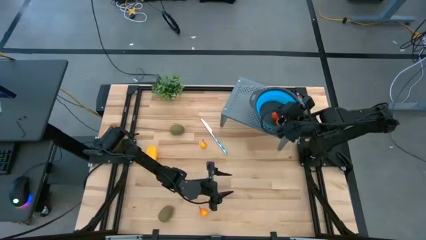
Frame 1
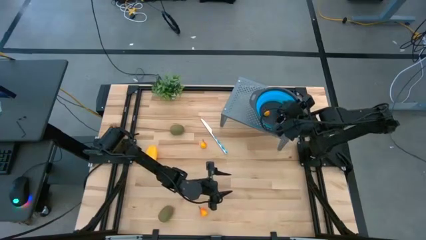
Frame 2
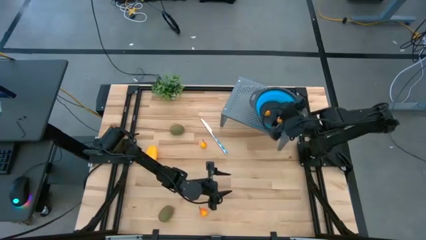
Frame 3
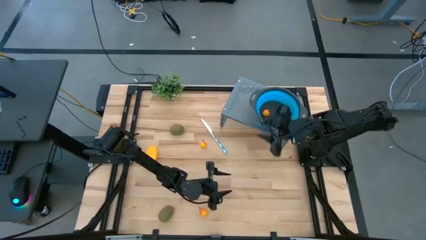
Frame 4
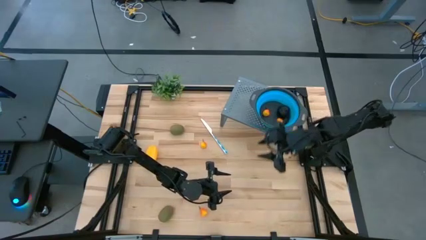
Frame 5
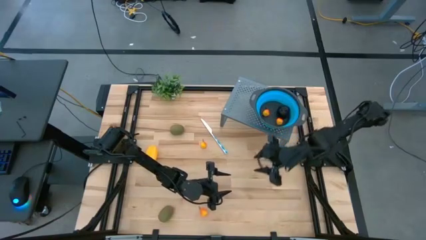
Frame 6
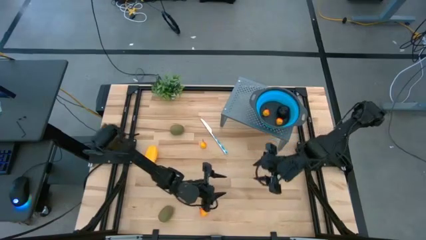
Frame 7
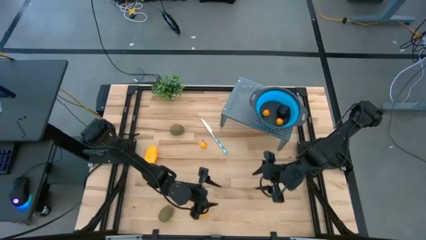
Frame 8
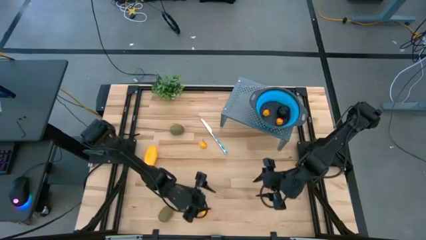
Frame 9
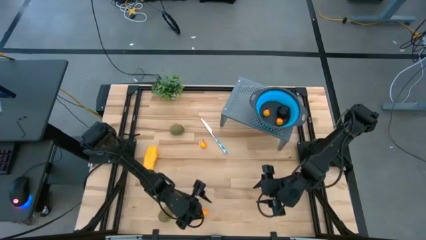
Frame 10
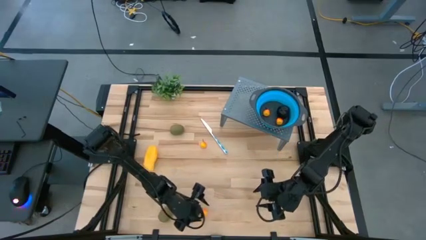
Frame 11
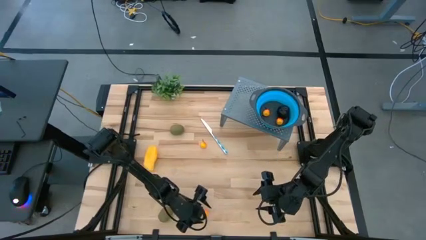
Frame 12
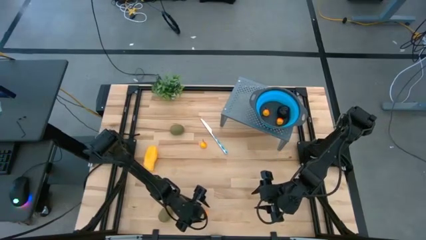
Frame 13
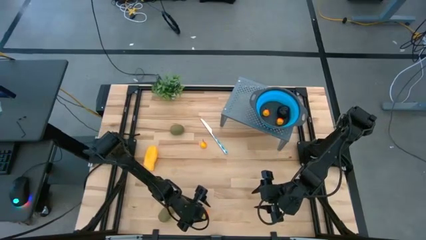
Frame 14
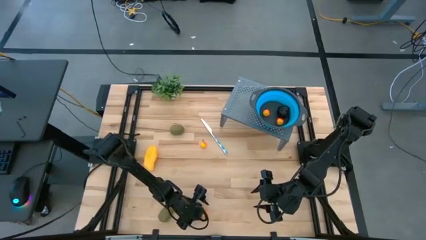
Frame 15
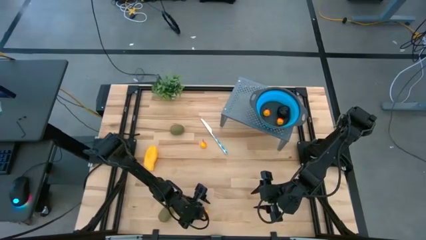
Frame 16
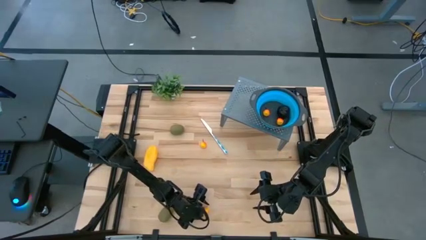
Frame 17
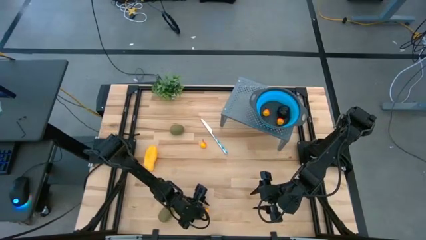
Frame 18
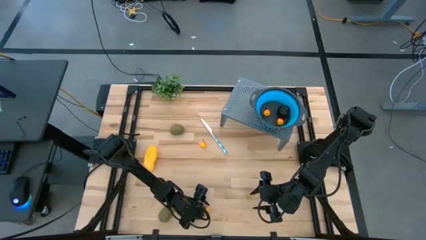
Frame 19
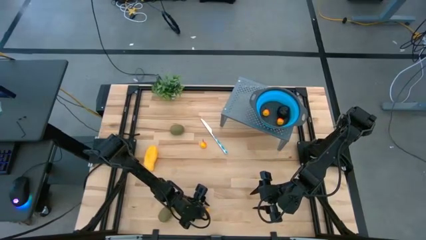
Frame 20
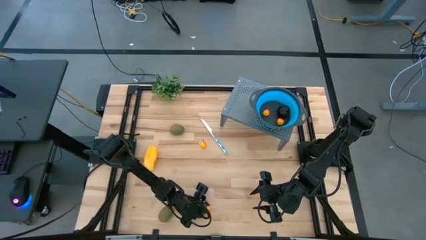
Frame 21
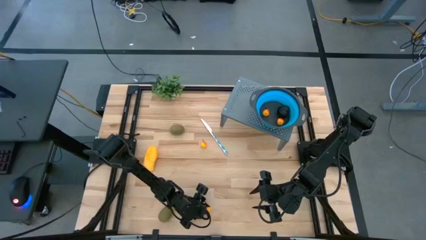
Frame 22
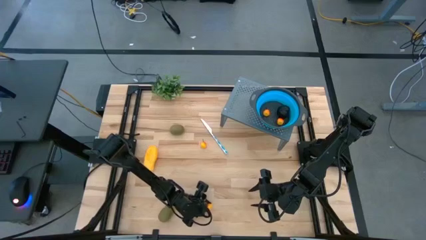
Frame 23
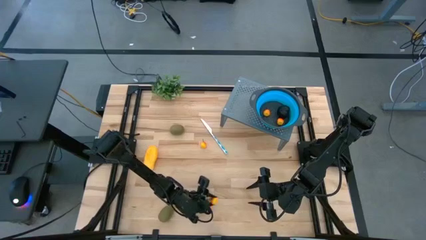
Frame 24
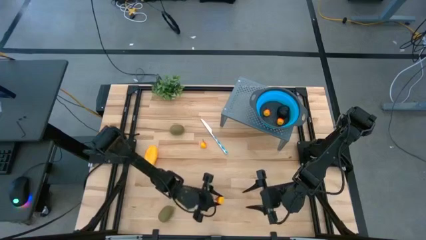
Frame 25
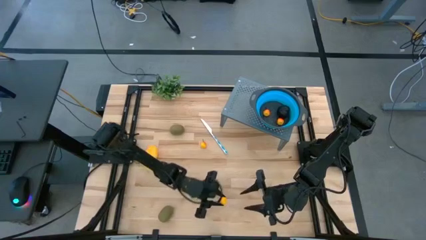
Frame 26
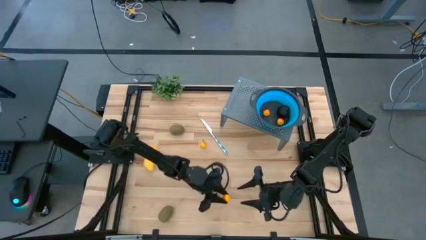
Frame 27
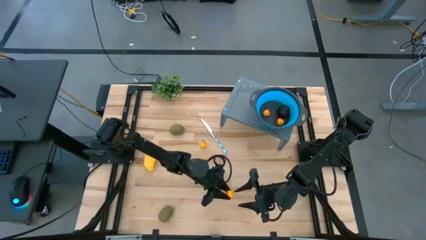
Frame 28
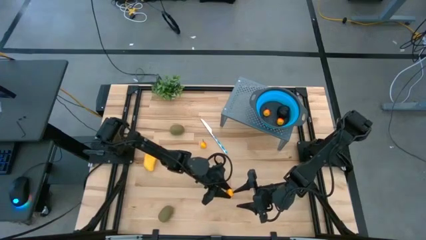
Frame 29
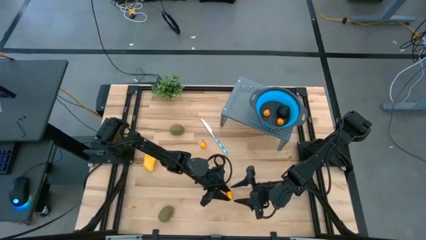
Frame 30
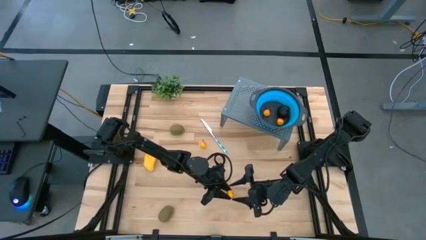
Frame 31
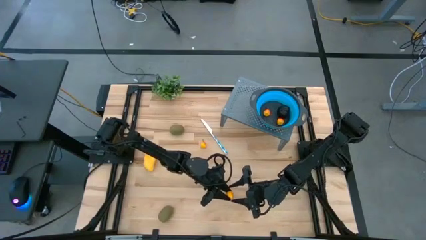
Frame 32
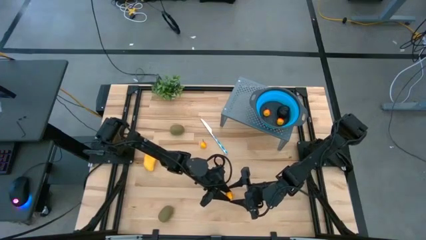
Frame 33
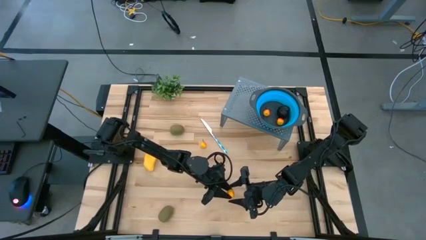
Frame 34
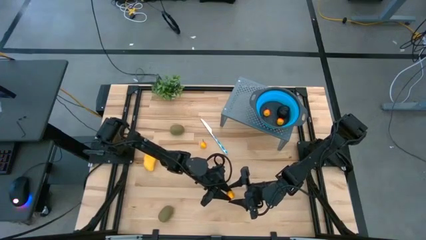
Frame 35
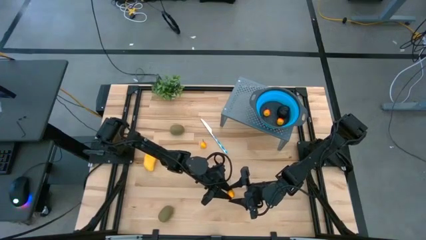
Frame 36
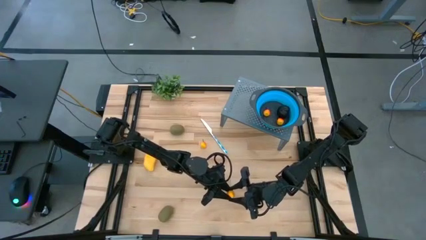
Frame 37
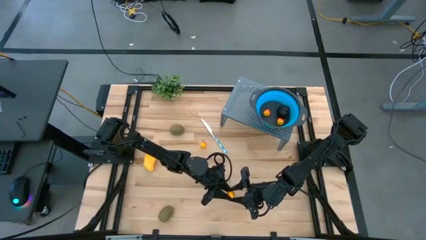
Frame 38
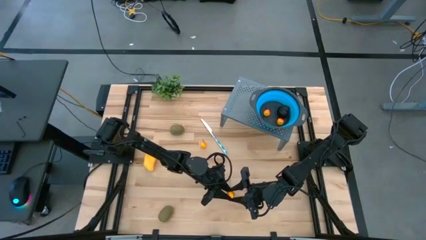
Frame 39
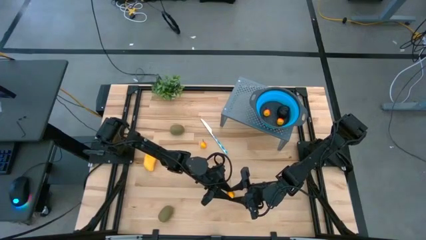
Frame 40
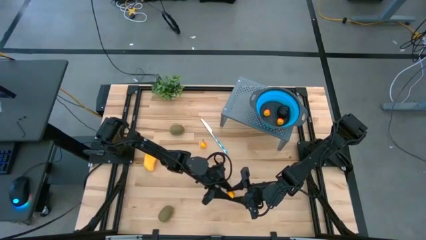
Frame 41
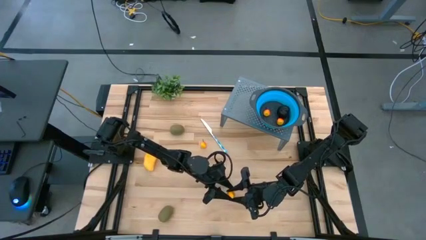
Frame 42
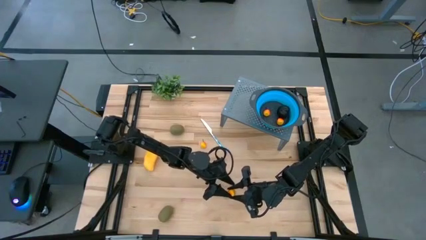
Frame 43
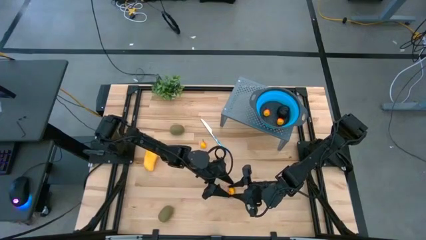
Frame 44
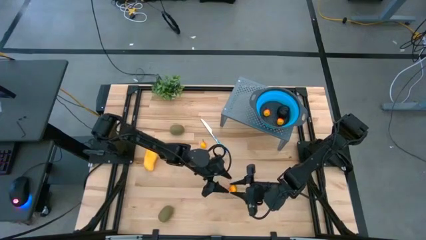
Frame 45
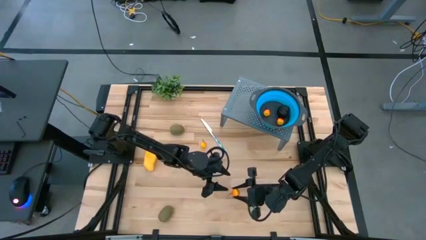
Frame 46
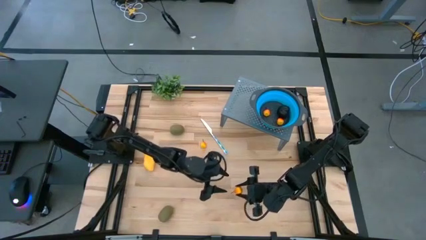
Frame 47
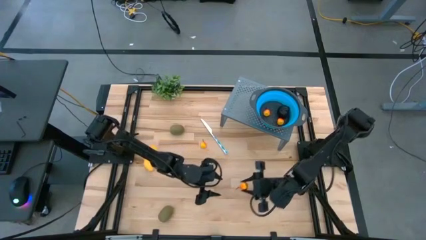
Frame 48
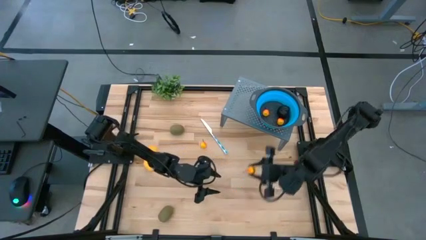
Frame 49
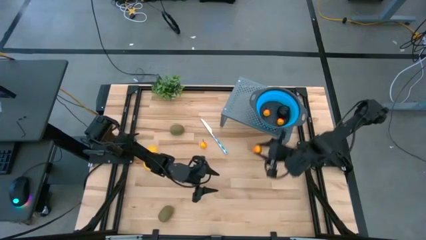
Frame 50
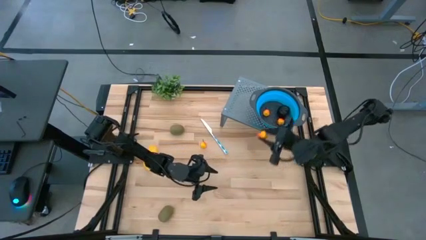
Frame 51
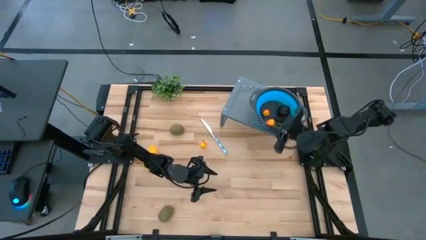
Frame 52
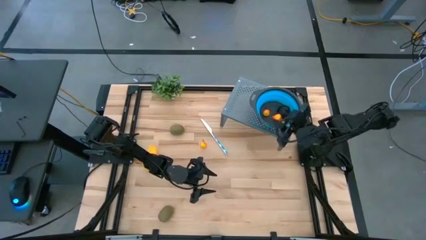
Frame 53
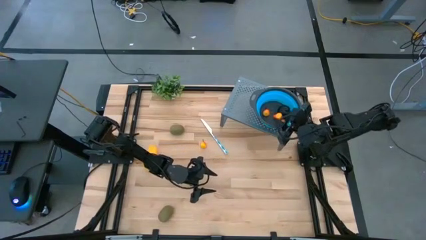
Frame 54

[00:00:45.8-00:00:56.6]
Task: Pick & Place Fruit
Put the peach into the blue strainer bowl on the shelf

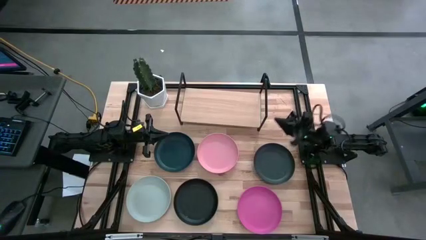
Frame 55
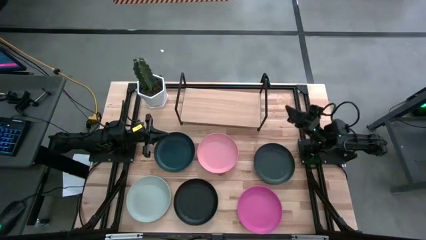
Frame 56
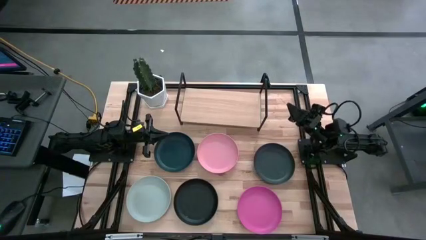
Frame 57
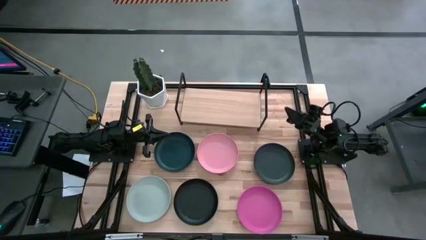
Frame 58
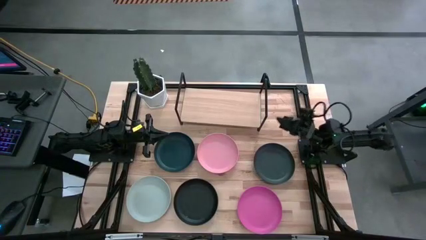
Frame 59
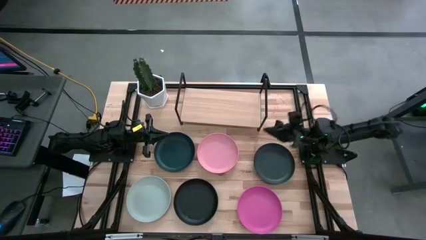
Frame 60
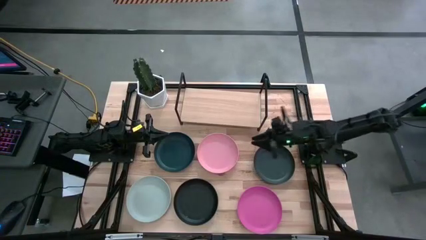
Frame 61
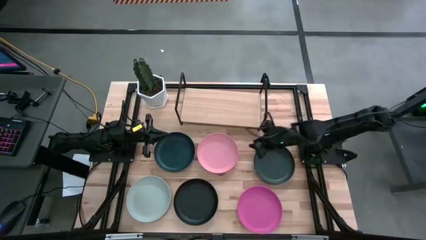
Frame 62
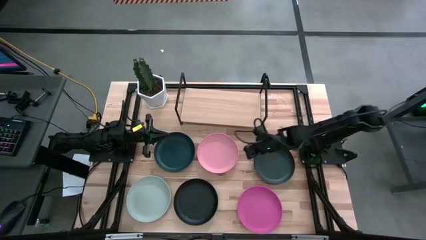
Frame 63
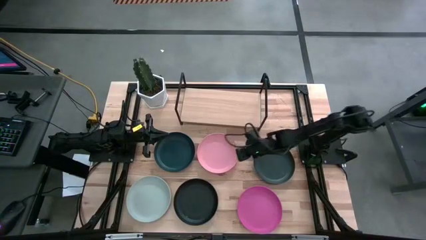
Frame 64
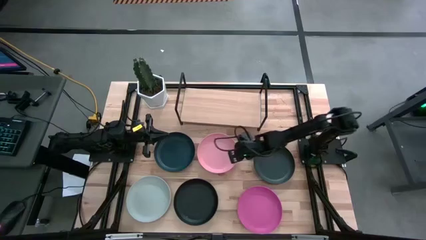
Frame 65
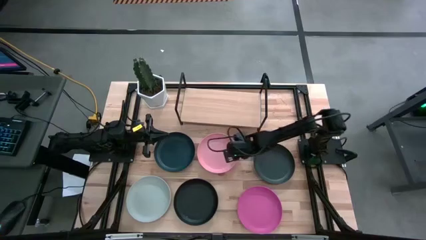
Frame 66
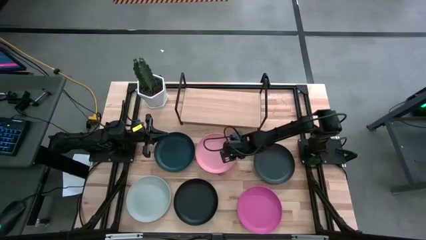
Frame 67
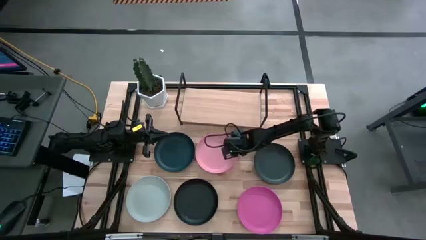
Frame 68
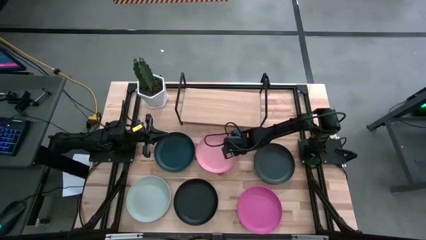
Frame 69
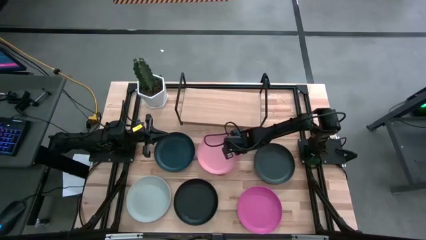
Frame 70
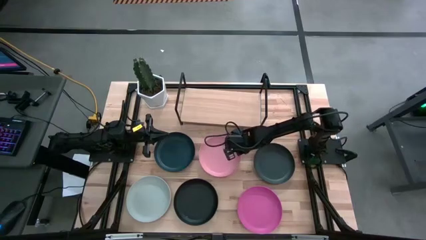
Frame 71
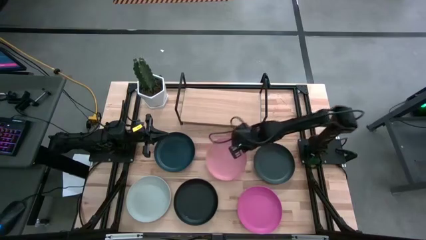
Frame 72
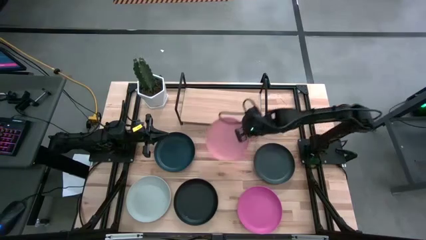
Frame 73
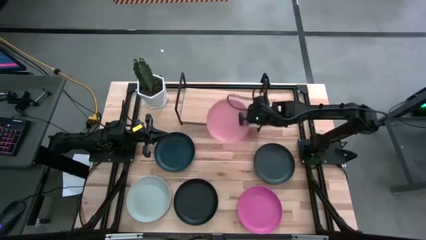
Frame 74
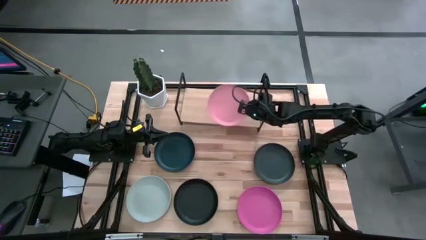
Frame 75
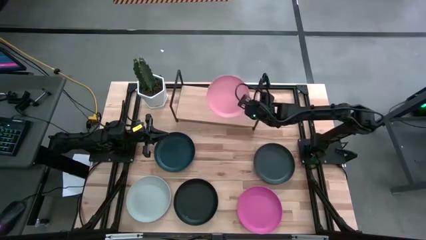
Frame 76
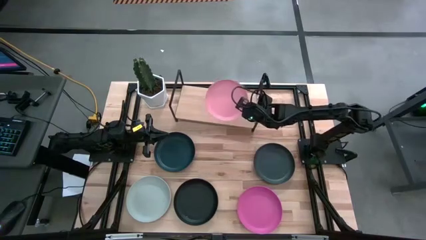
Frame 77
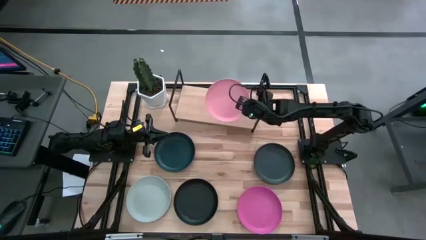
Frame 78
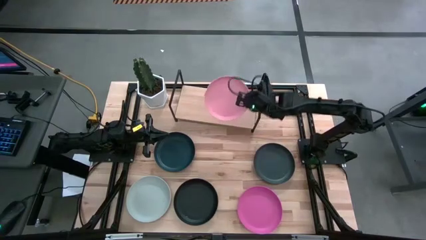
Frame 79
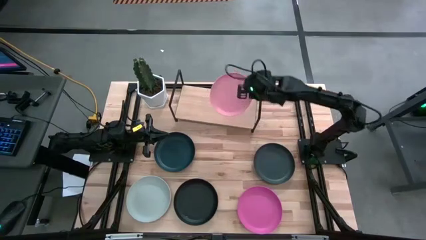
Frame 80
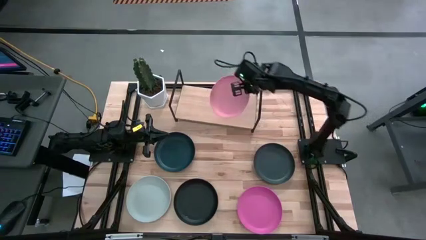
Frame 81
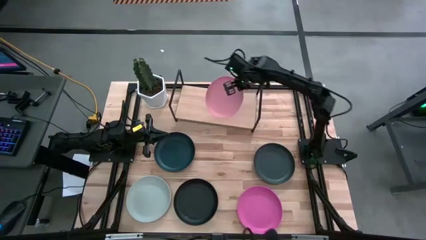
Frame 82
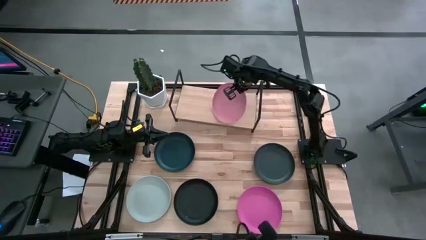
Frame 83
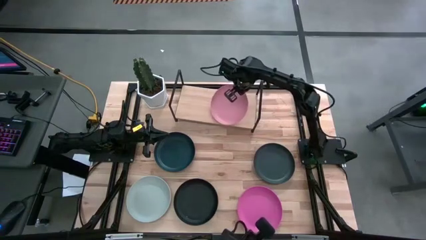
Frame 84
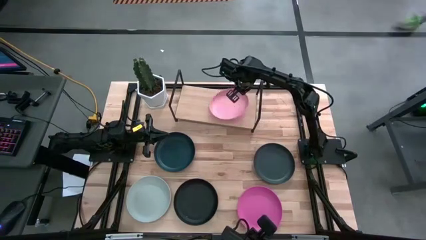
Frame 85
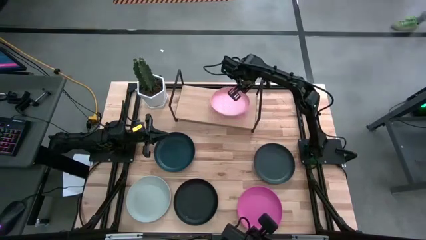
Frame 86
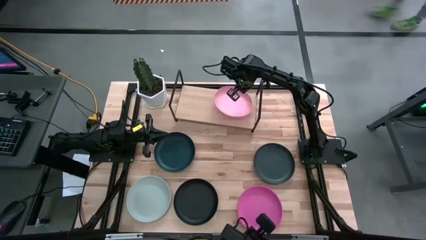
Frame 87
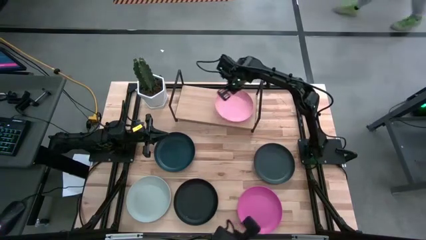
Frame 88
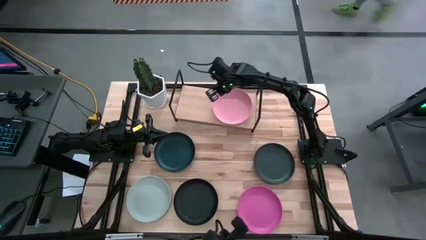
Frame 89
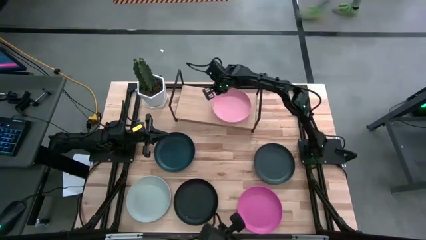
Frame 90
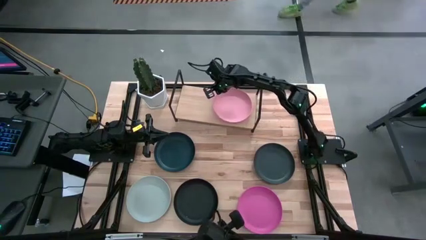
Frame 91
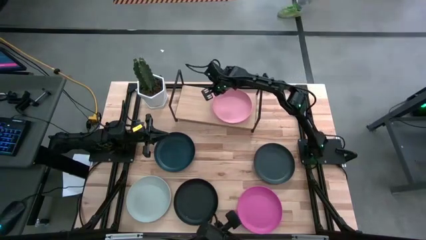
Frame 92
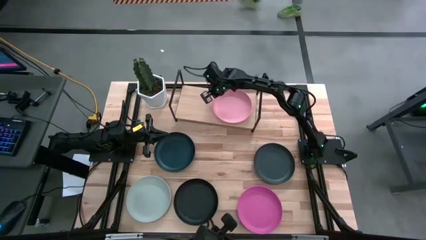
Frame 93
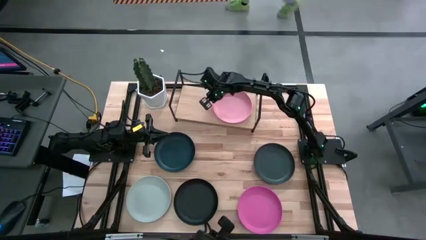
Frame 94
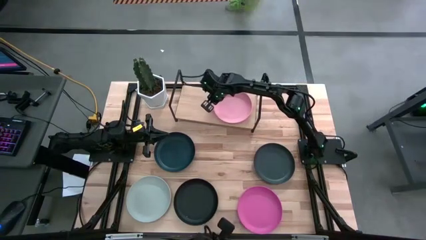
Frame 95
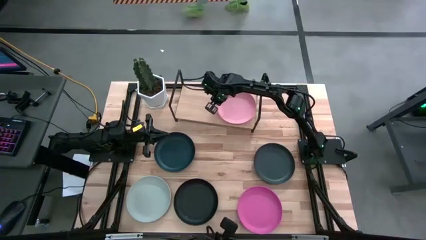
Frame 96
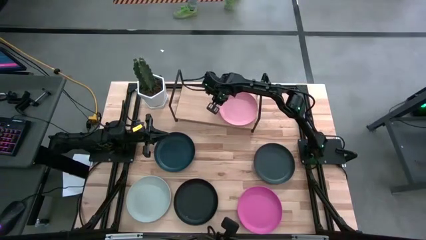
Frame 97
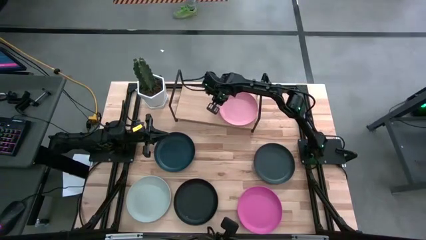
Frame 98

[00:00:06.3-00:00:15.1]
Task: Place and stack plates onto a shelf
Put the light pink plate on the shelf
